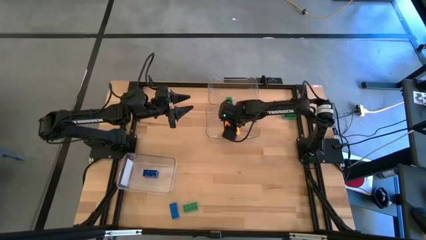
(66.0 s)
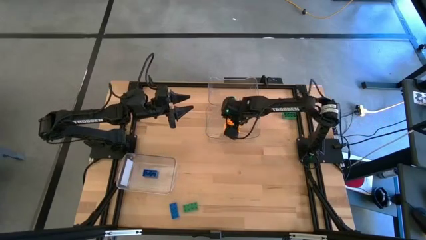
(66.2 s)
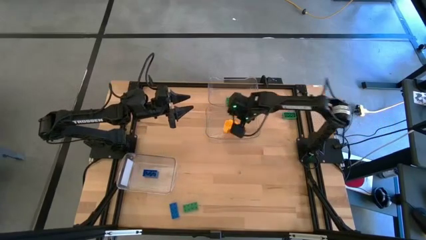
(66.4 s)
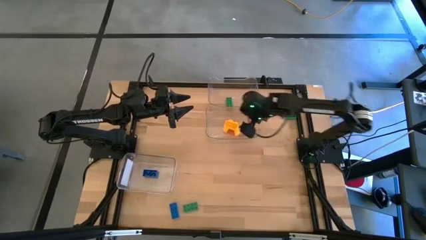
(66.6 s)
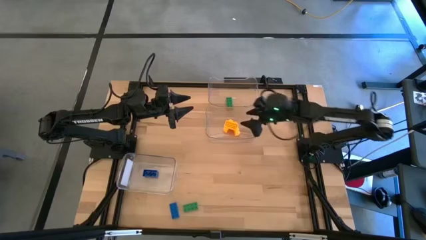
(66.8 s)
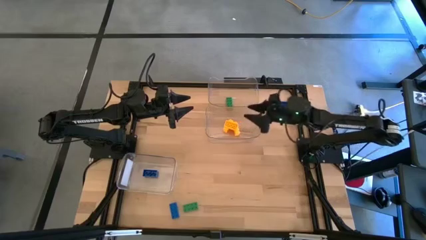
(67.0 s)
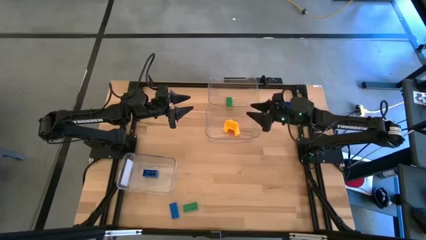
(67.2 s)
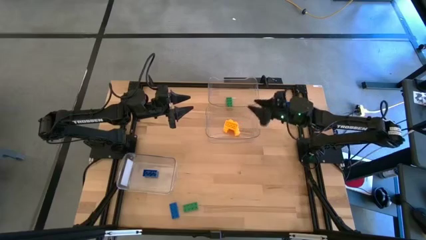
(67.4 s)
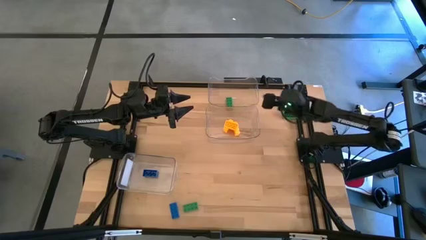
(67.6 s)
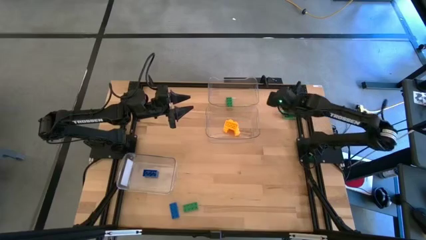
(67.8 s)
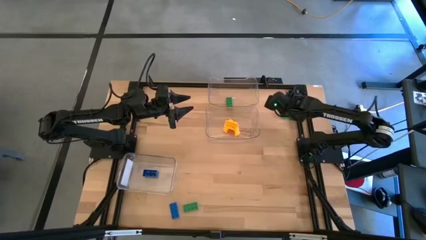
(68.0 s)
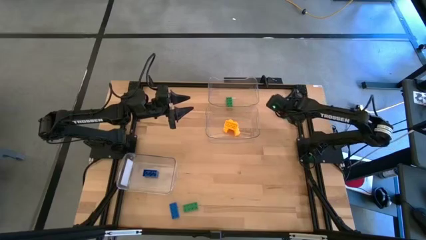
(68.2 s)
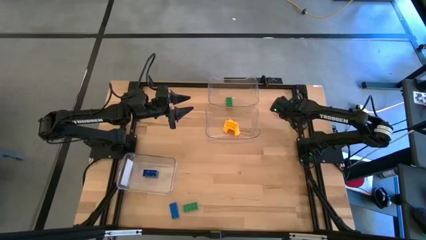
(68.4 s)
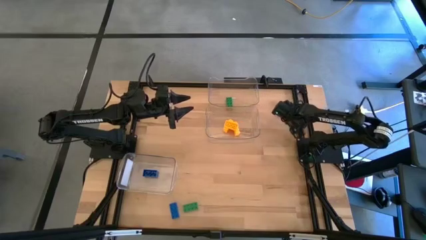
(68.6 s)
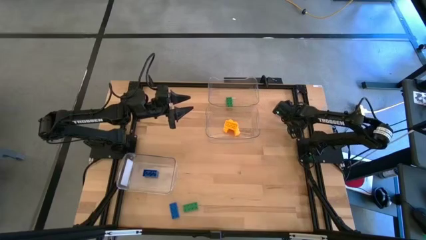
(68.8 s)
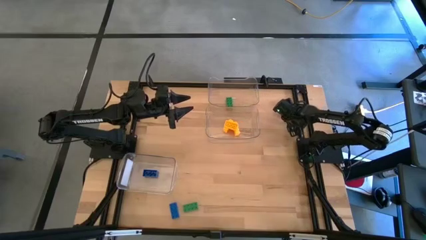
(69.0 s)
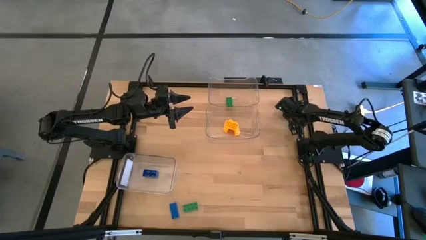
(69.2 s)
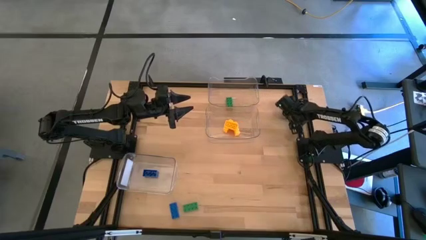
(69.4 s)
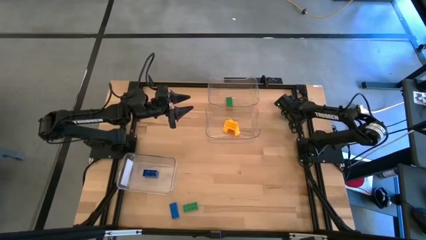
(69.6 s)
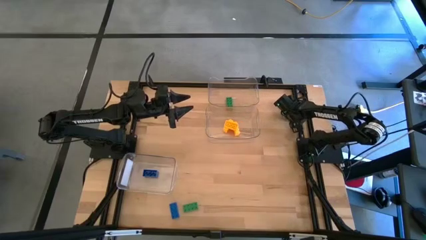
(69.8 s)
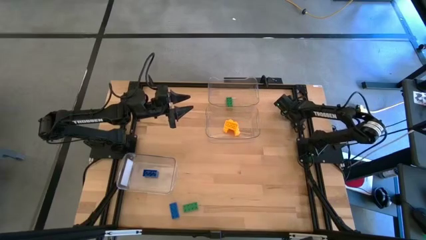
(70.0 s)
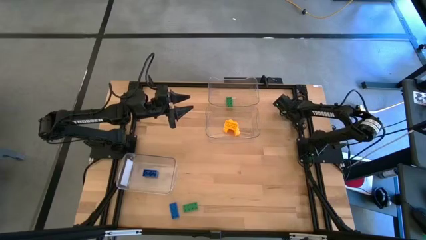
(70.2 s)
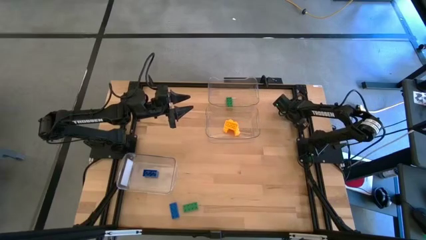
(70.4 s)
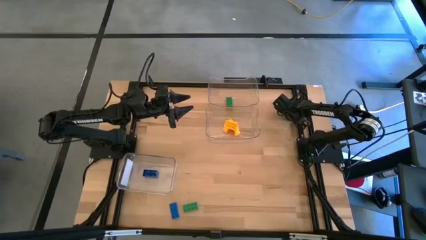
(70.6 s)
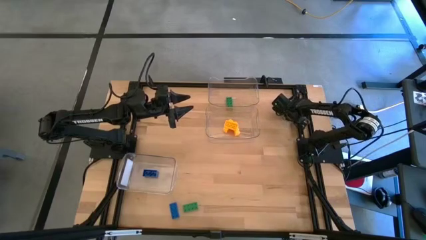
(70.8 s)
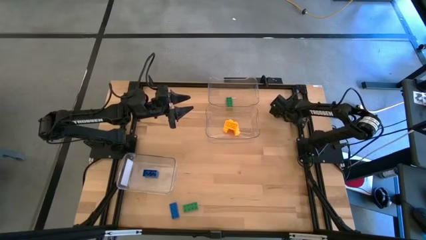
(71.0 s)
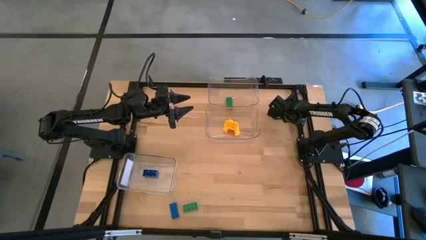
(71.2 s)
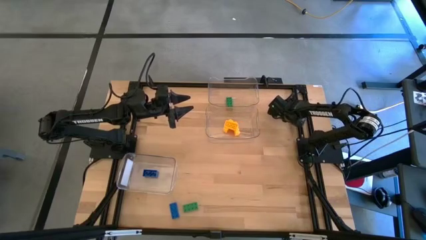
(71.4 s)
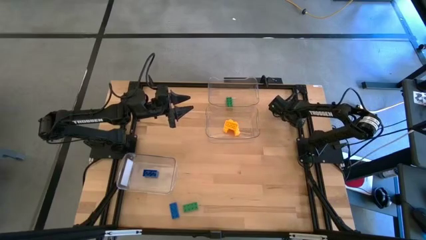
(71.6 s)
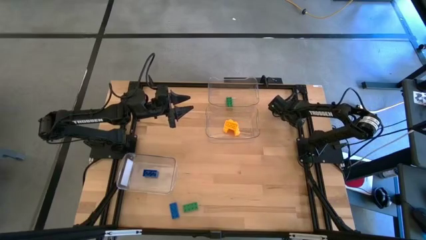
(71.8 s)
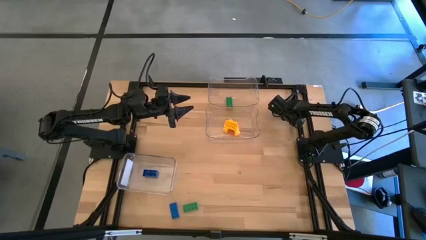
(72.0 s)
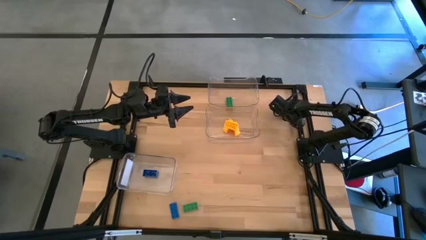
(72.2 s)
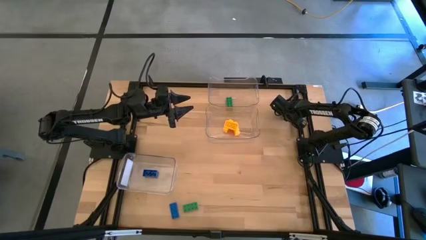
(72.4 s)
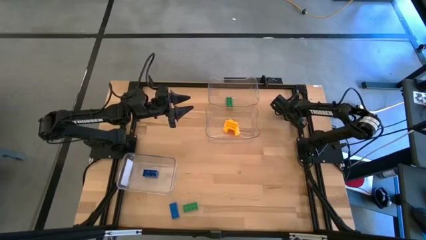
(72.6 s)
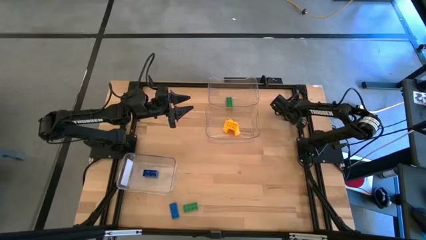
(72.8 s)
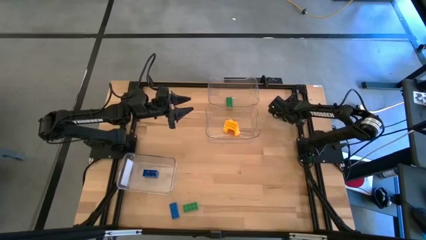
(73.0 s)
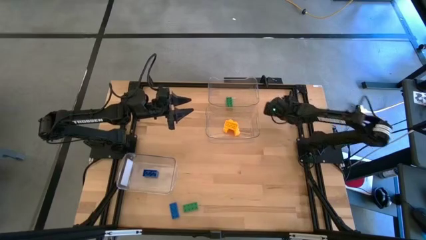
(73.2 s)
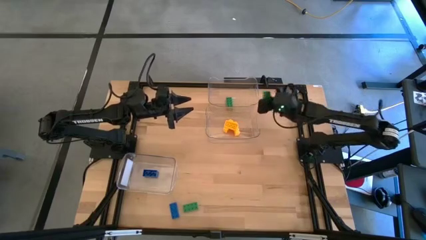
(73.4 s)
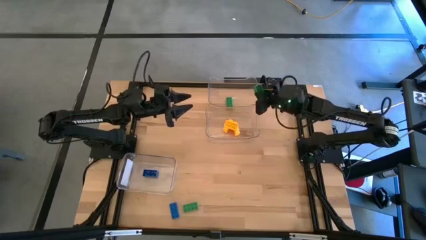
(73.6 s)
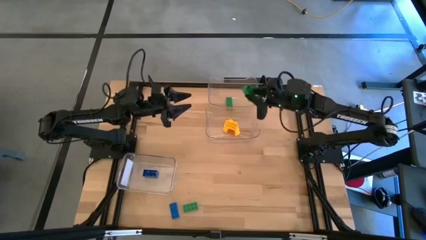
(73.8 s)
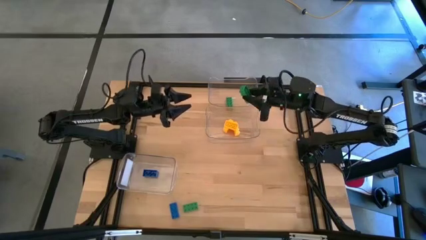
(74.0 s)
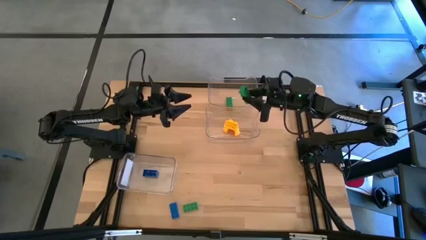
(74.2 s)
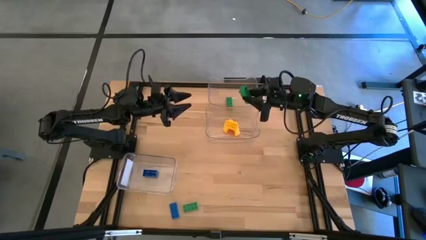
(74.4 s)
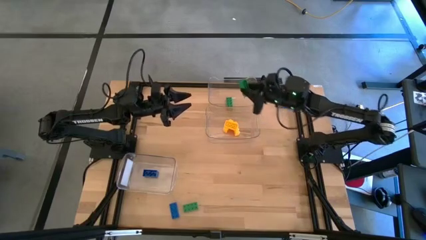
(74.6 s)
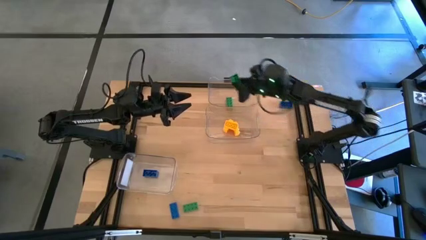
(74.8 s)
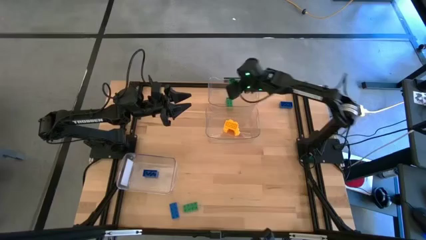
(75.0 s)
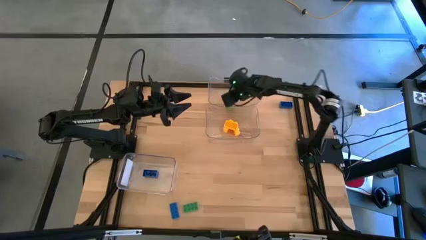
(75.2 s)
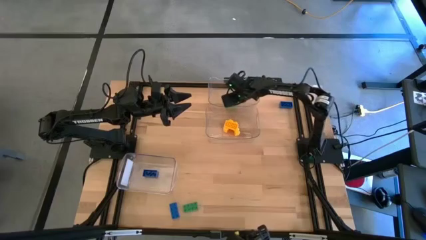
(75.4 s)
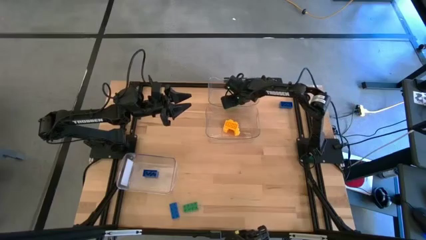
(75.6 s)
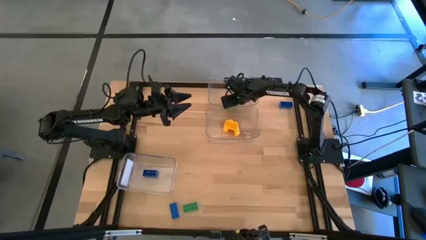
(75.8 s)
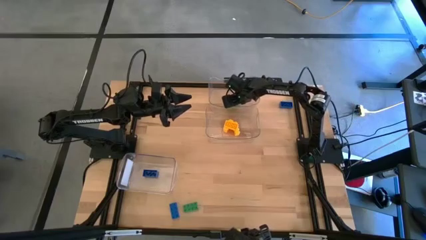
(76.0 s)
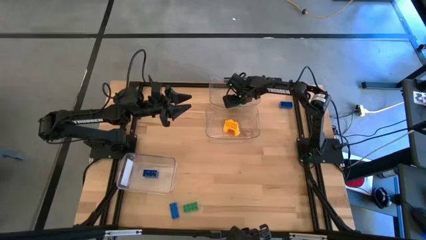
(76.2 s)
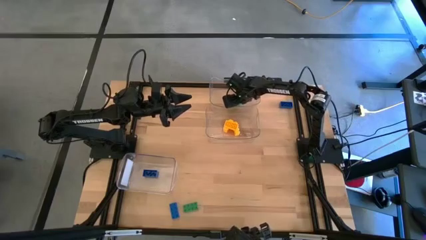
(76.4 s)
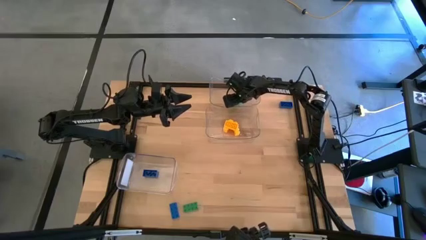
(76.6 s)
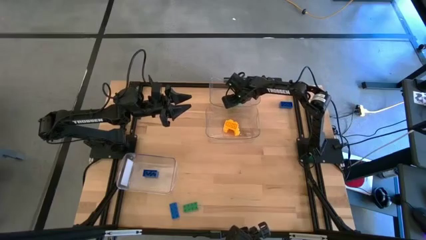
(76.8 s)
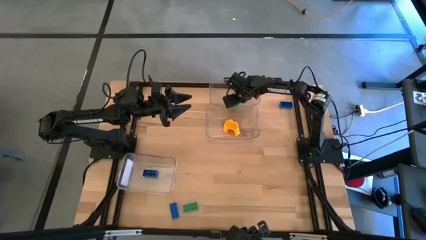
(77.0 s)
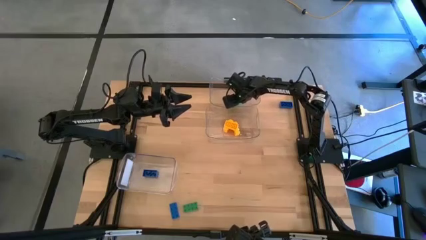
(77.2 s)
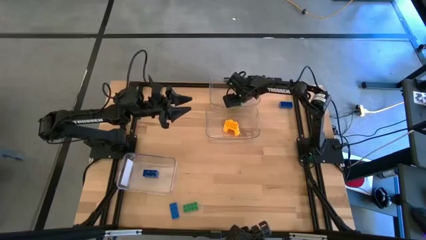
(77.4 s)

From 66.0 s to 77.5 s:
Task: Sort & place blocks by color
Put the top green game piece into the top transparent bin
